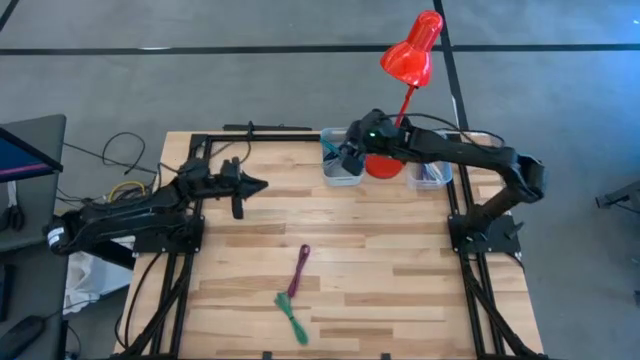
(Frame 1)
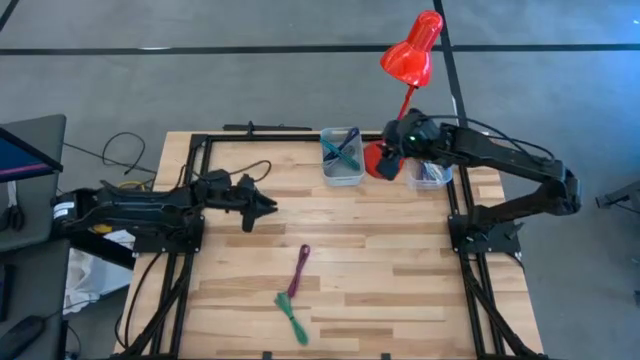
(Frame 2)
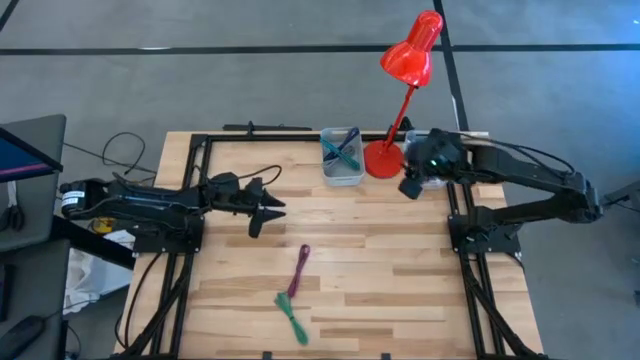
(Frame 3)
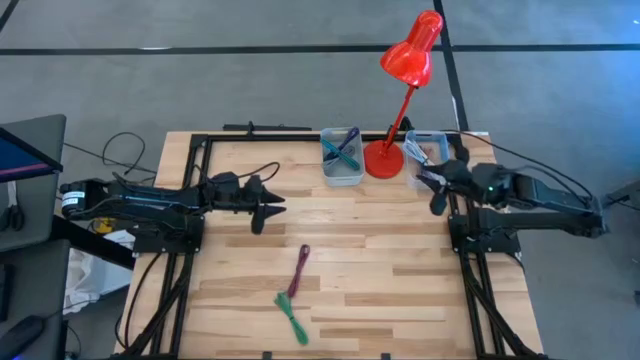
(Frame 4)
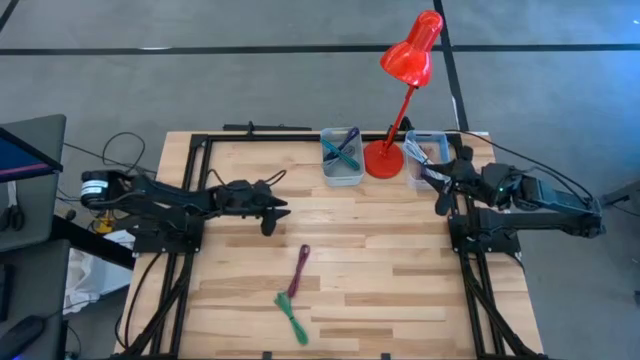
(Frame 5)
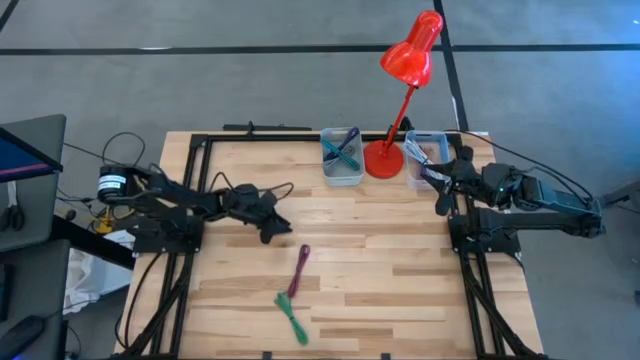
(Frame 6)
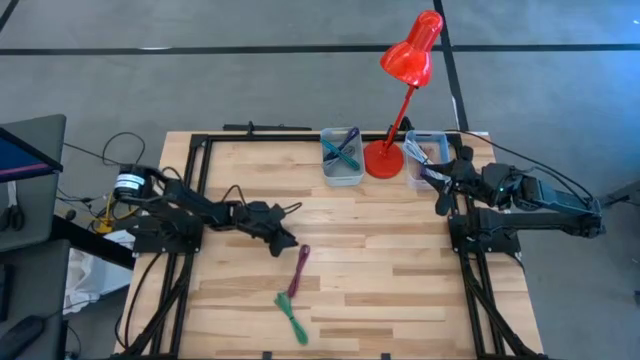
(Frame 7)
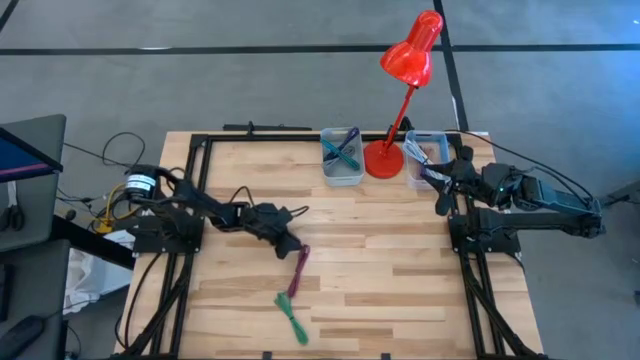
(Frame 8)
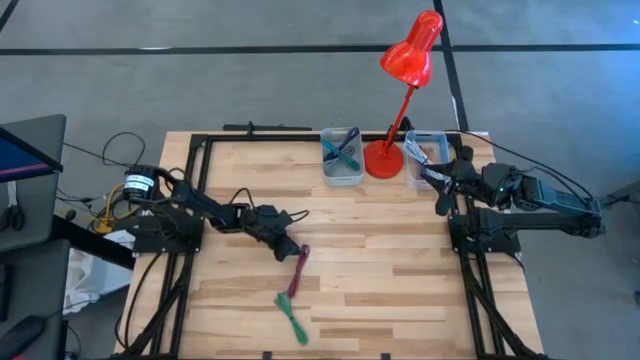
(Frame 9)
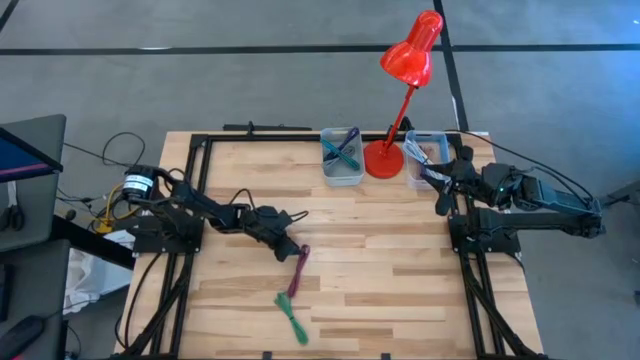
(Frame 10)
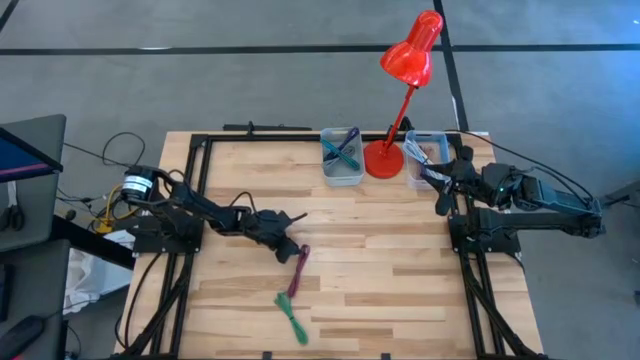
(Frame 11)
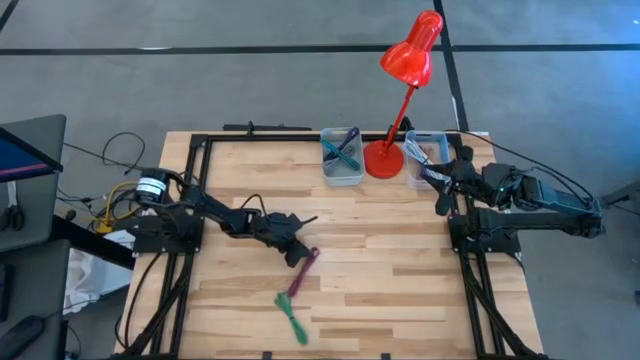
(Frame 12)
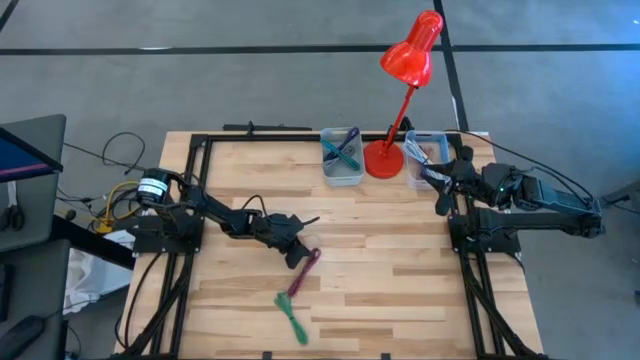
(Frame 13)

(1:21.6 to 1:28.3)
Task: Pick & Place USB Port
Put the pink patterned charger cable into the white bin

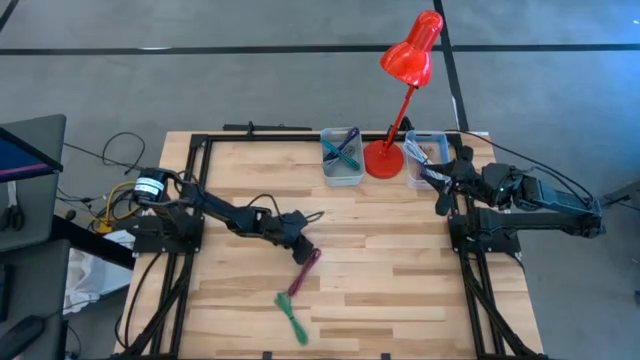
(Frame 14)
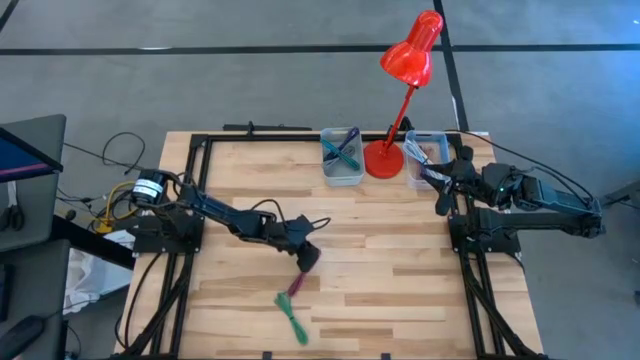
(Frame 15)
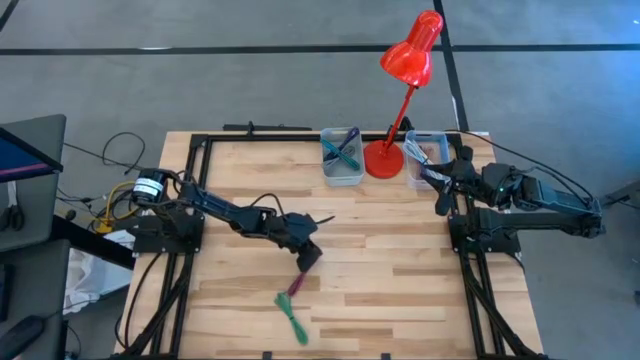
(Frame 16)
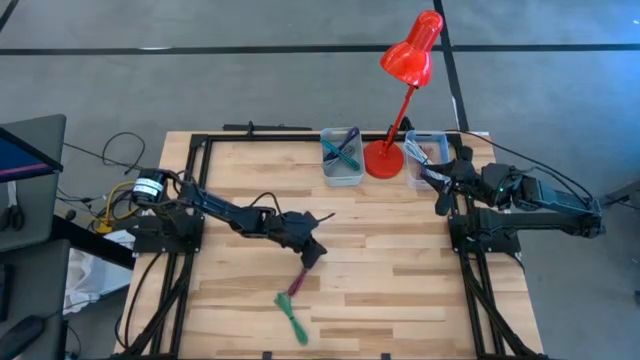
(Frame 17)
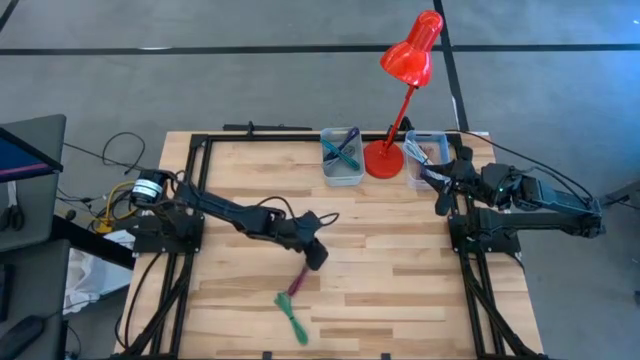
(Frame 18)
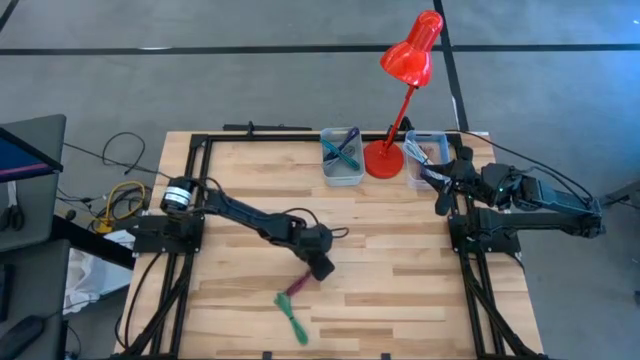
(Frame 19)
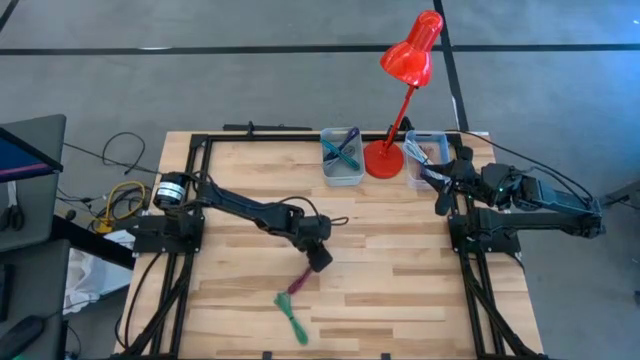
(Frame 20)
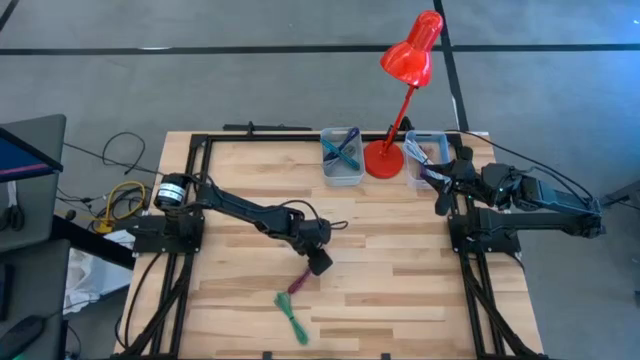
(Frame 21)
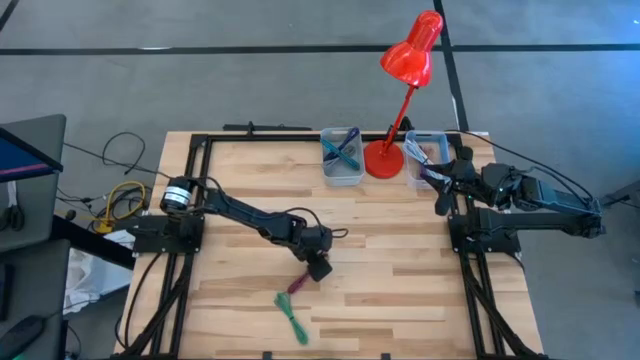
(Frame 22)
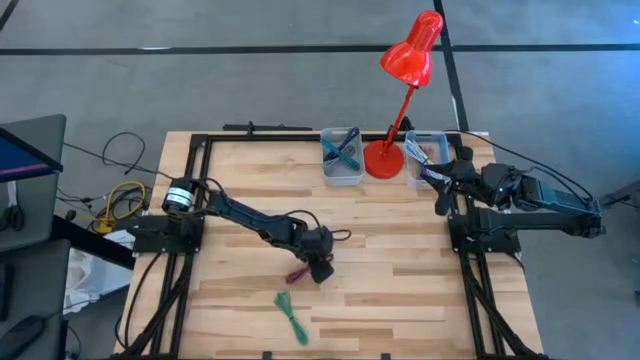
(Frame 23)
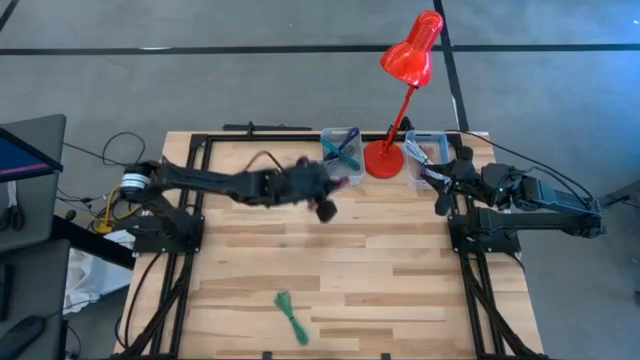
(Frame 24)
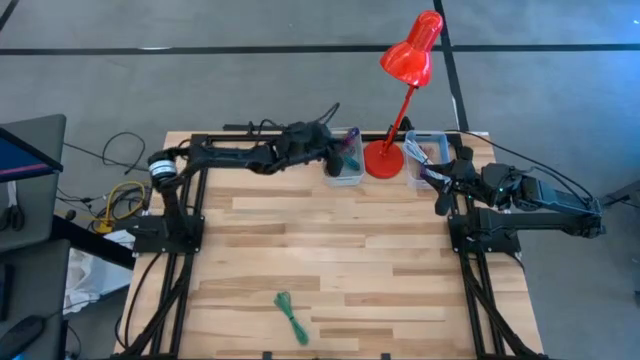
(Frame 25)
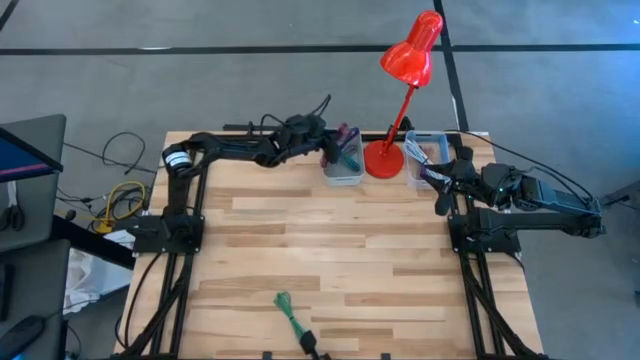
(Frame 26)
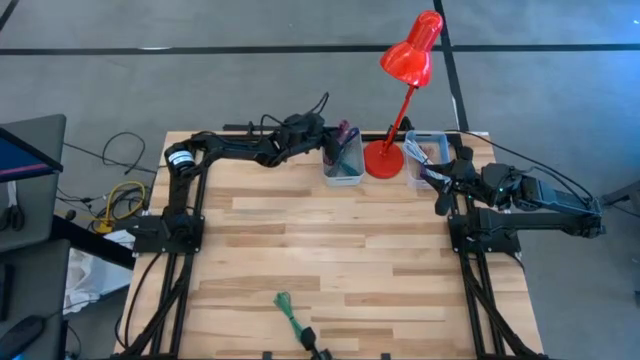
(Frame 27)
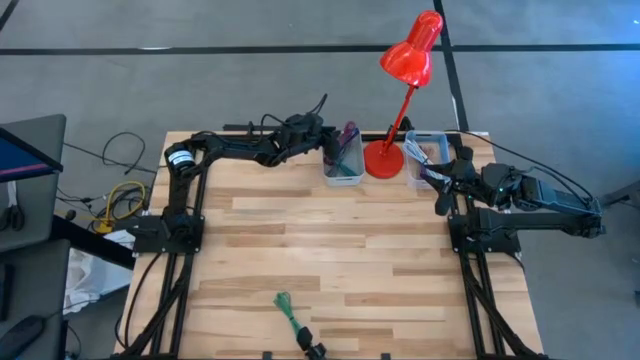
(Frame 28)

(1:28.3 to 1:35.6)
Put the pink patterned charger cable into the white bin

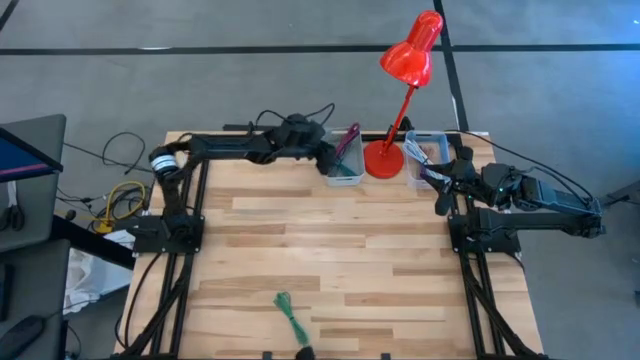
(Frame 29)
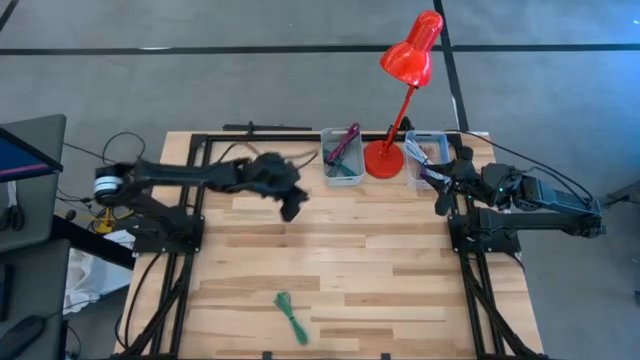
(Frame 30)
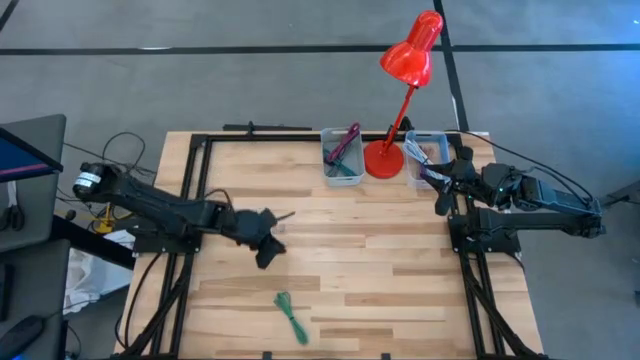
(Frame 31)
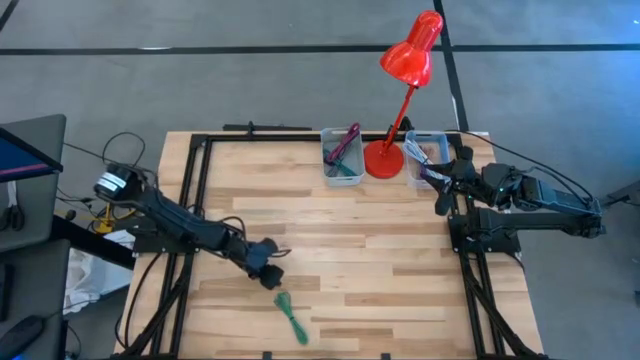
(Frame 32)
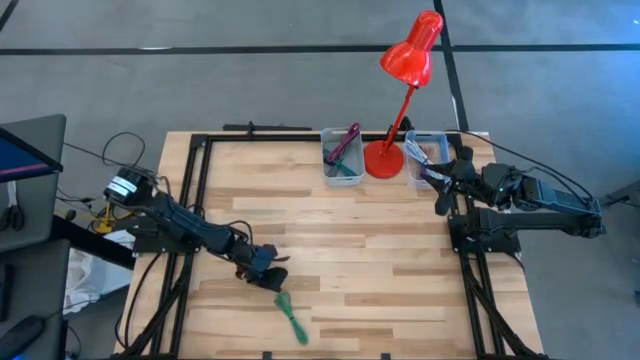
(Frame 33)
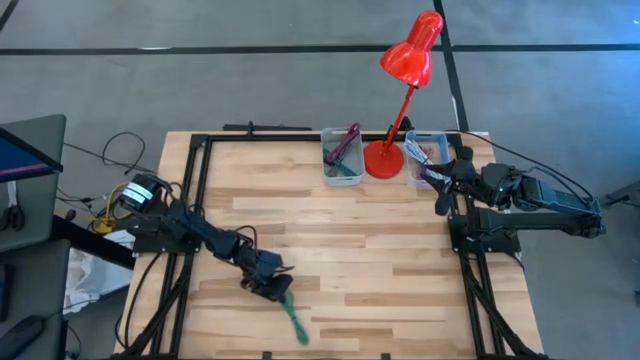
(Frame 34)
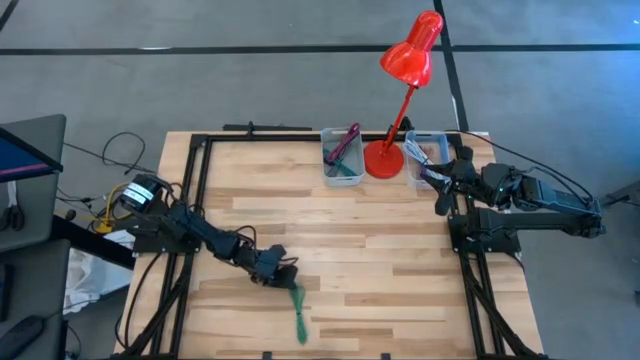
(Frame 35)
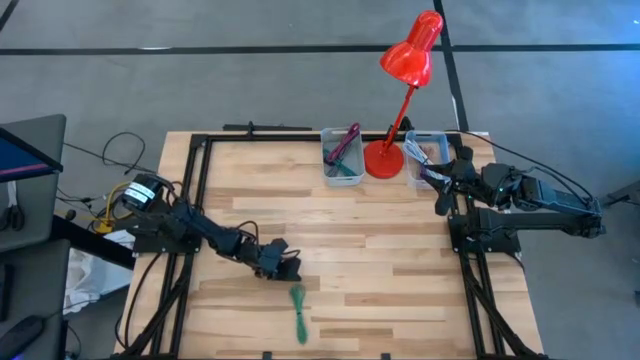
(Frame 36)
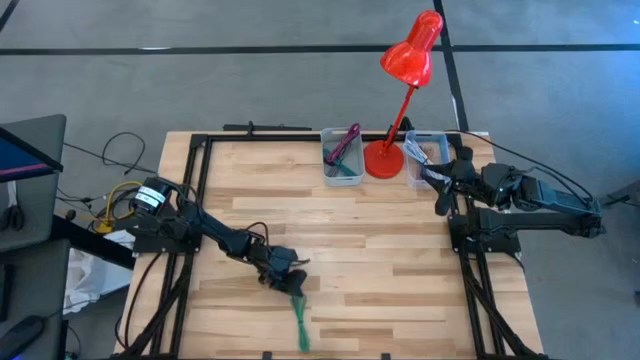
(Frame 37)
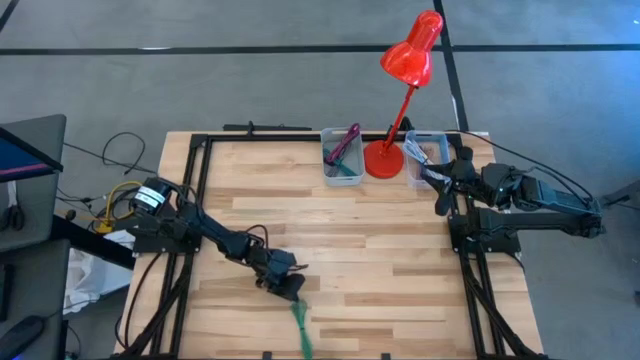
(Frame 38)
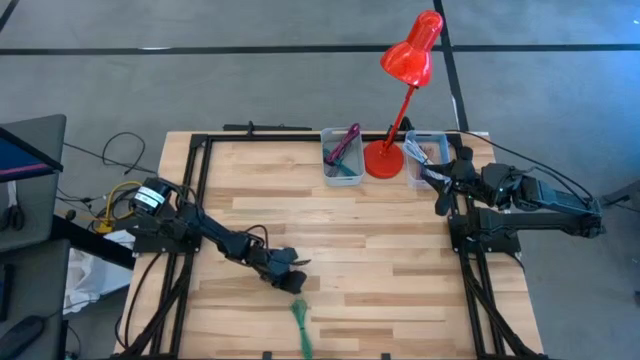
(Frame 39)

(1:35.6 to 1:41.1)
Put the green charger cable into the transparent bin

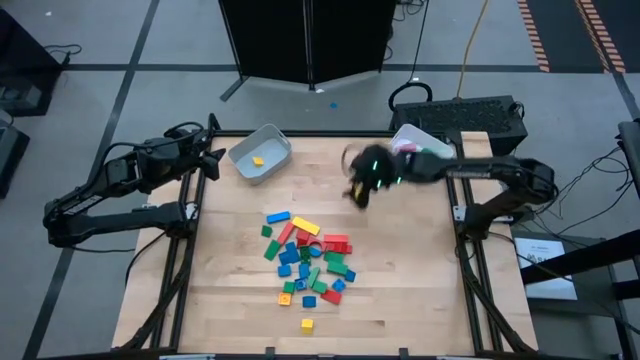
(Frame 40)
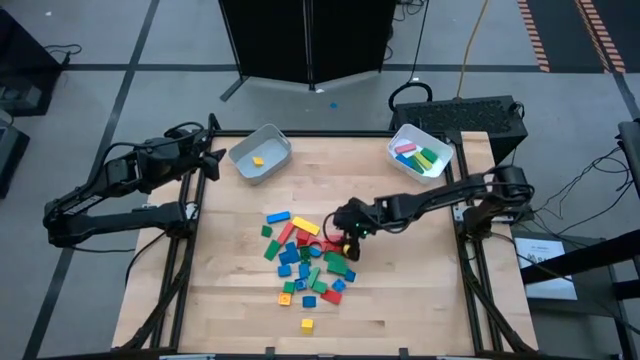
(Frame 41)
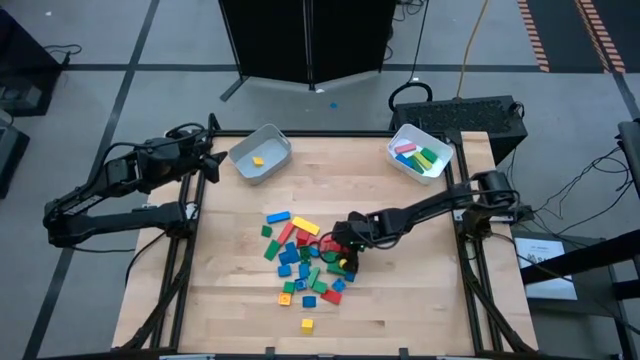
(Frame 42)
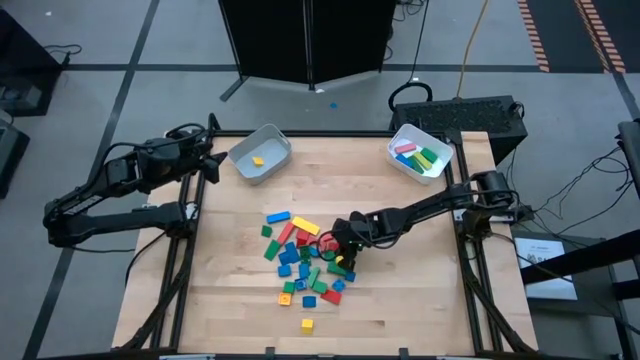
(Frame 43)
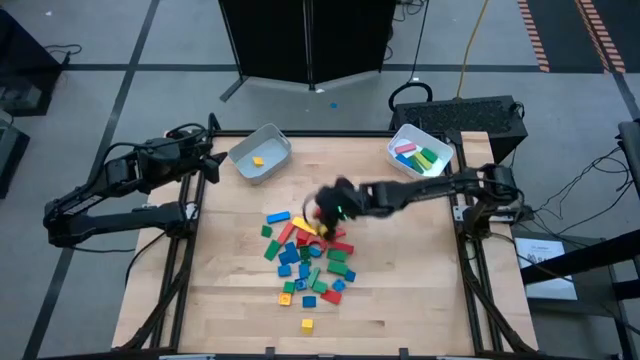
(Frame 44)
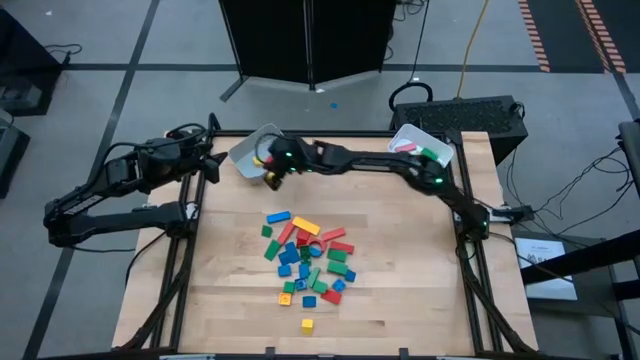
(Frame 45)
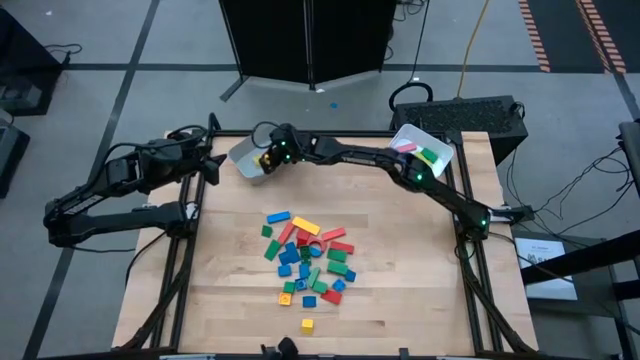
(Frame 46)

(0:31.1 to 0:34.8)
Task: Sort blocks by size
Put the square red block into the gray bin
